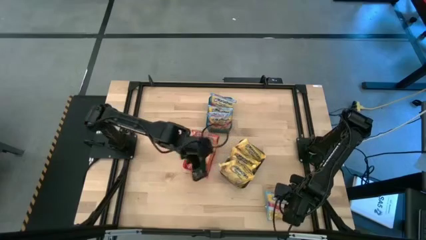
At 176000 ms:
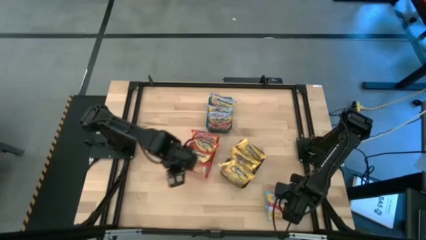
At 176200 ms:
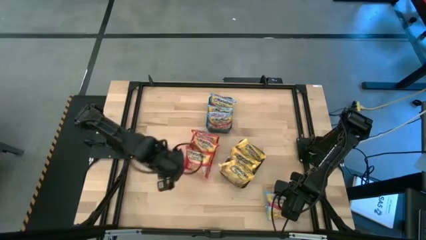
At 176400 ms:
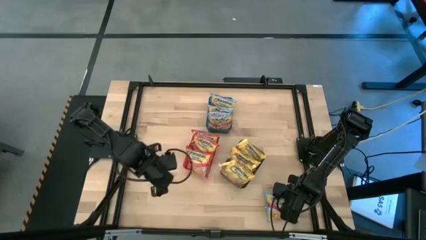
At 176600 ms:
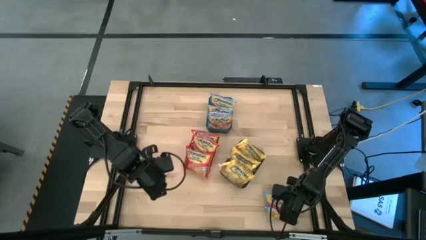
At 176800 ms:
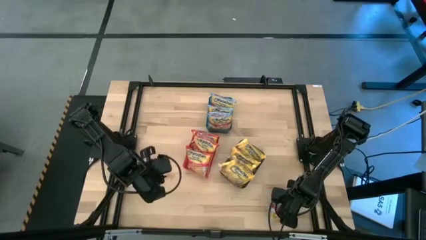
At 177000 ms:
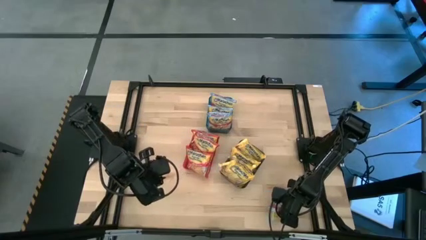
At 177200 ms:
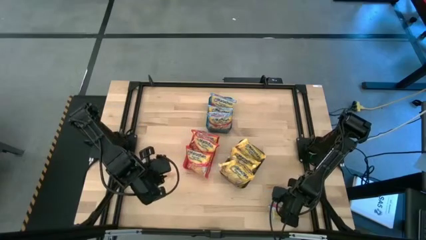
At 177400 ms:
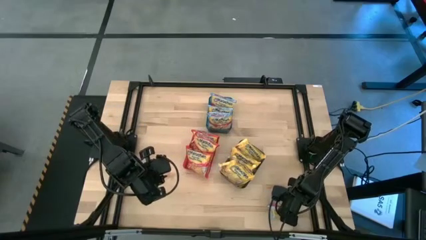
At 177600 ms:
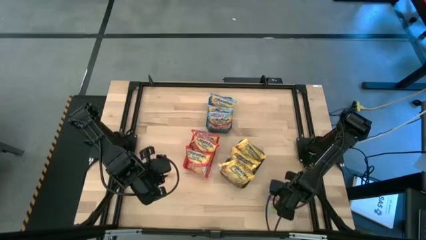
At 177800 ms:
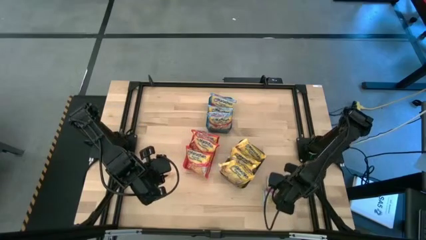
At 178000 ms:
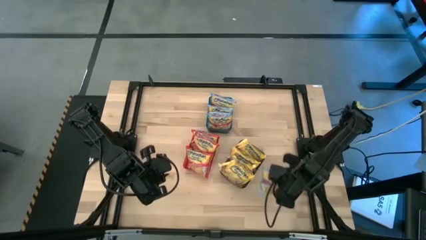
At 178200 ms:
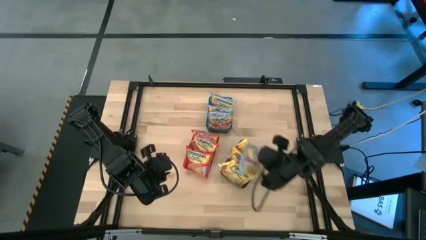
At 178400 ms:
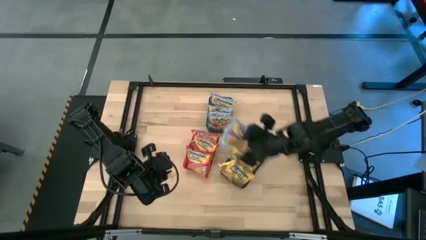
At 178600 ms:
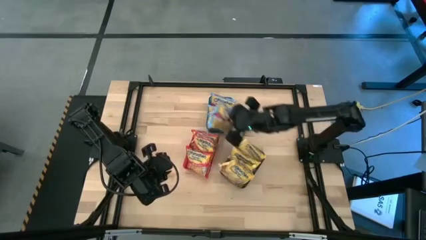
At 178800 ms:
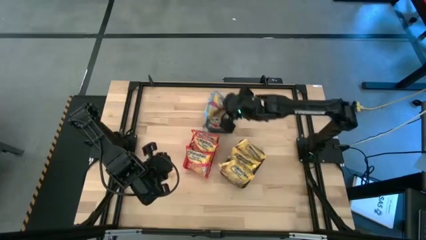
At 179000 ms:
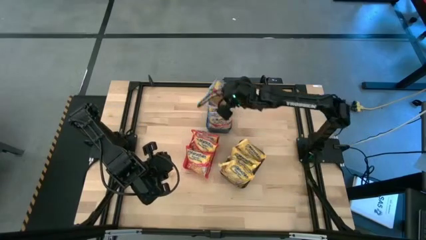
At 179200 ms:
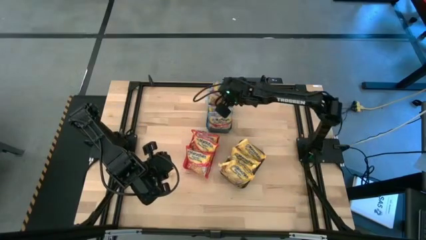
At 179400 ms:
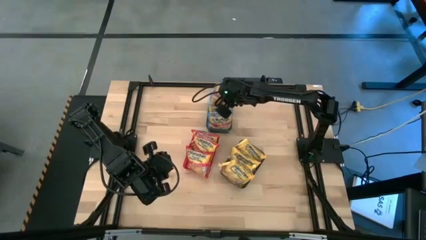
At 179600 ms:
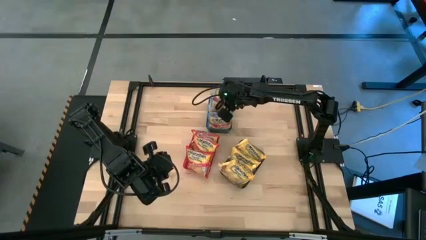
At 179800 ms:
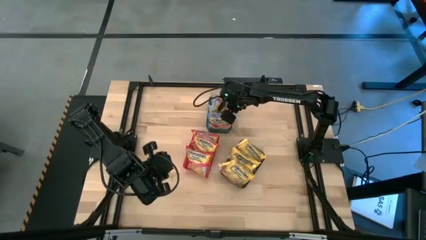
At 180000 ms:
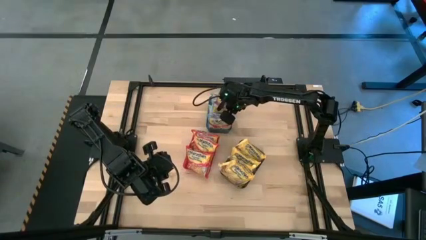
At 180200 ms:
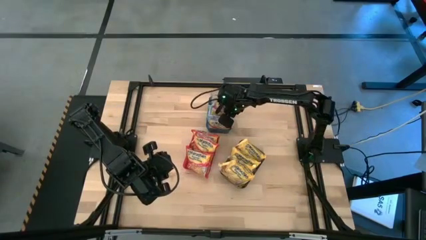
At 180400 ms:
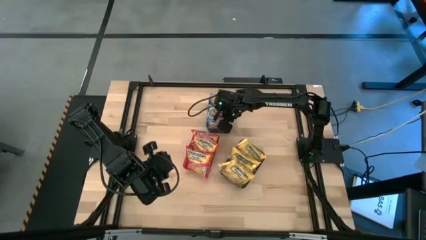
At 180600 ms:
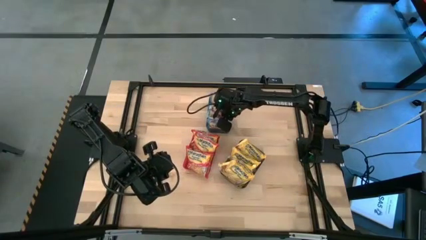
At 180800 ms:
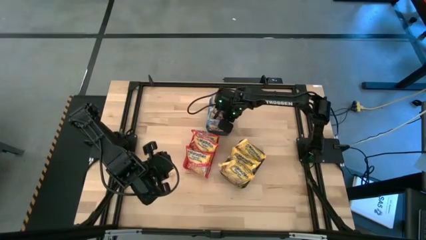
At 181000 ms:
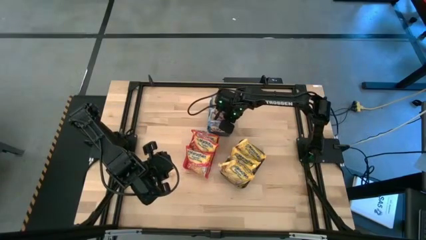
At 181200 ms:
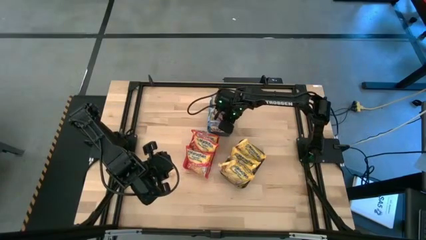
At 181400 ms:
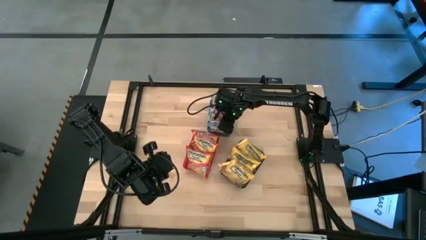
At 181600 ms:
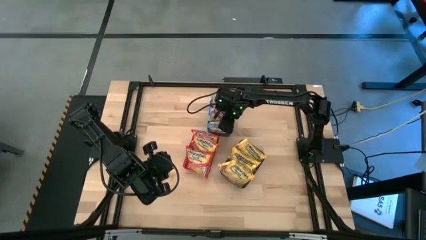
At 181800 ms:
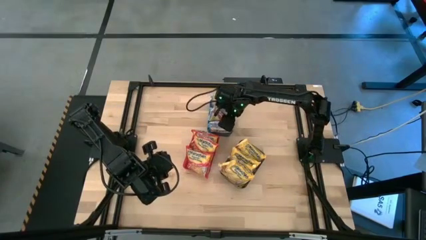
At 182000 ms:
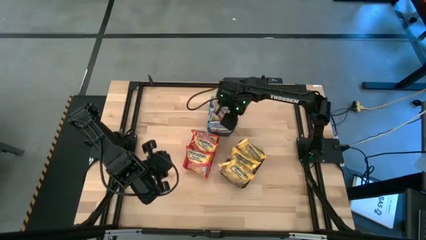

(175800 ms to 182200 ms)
Task: Sort Maruchan noodles
Put the blue bag into the blue bin

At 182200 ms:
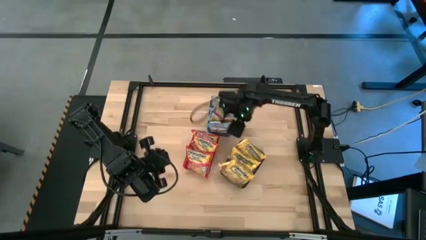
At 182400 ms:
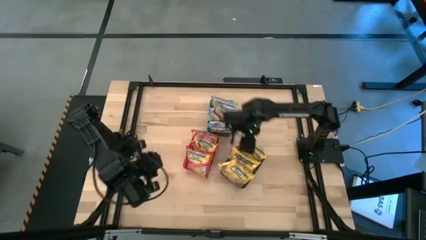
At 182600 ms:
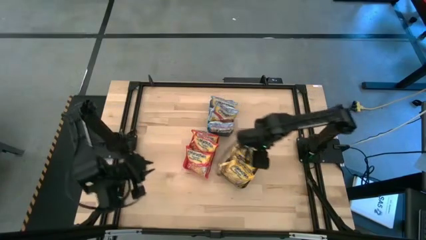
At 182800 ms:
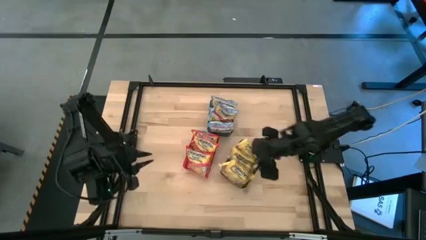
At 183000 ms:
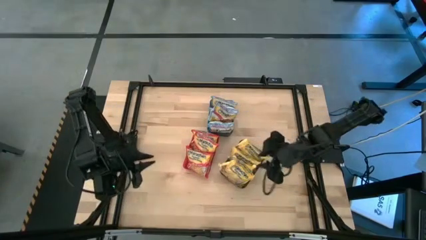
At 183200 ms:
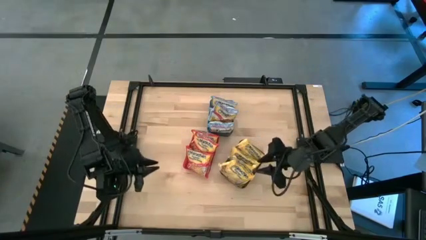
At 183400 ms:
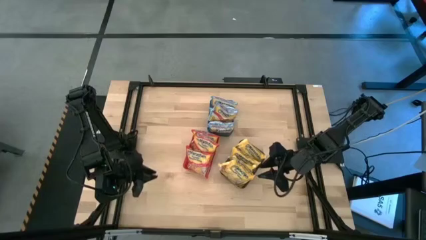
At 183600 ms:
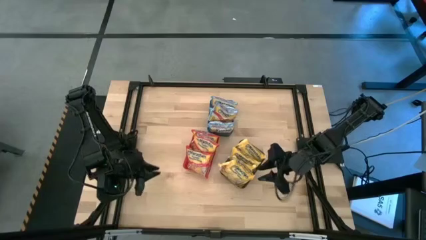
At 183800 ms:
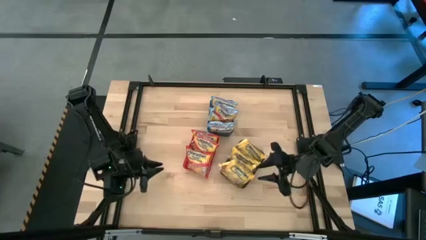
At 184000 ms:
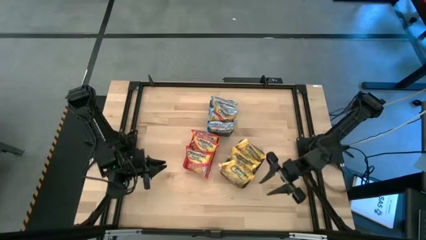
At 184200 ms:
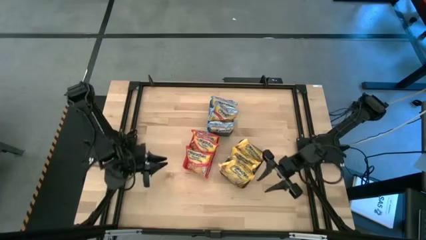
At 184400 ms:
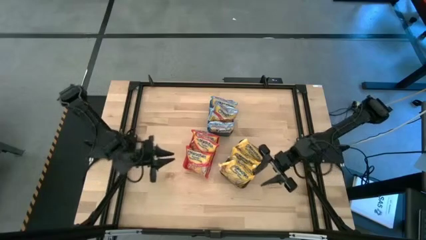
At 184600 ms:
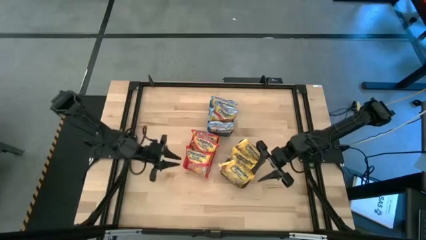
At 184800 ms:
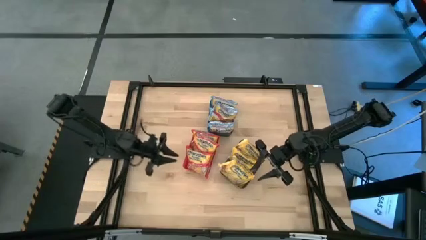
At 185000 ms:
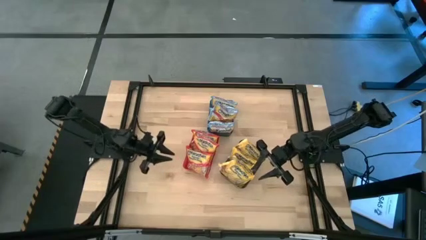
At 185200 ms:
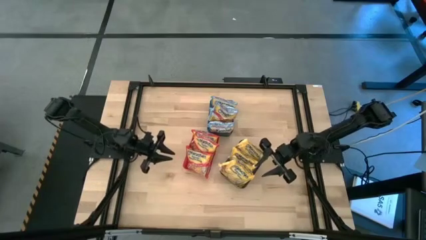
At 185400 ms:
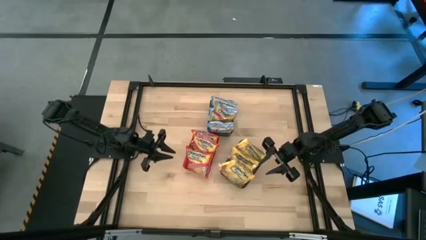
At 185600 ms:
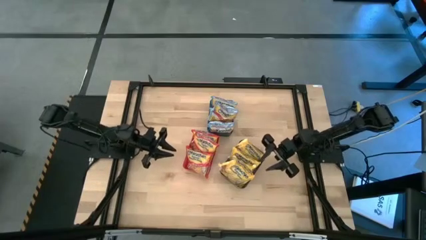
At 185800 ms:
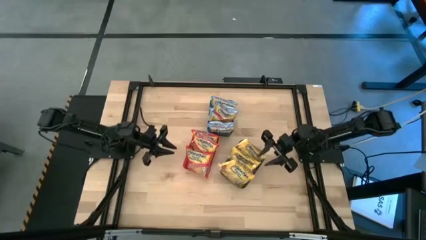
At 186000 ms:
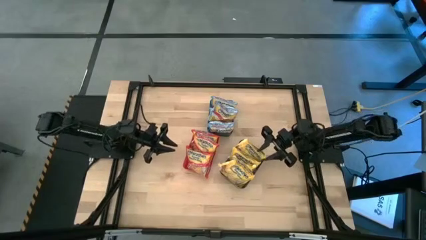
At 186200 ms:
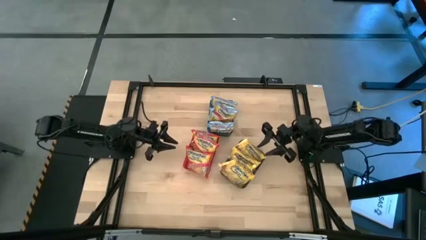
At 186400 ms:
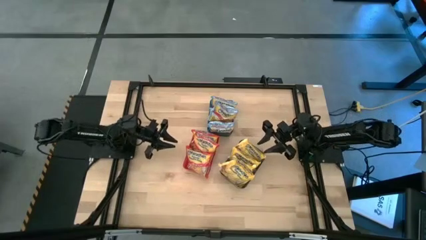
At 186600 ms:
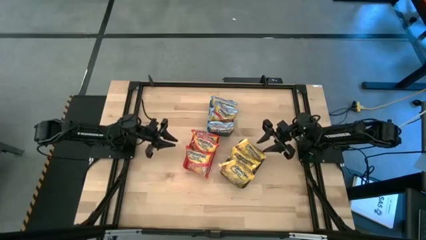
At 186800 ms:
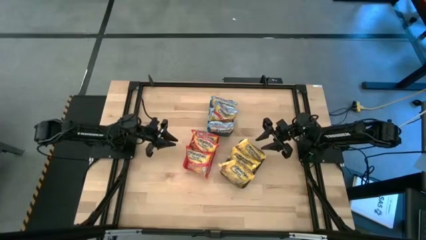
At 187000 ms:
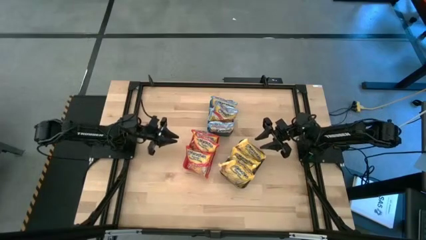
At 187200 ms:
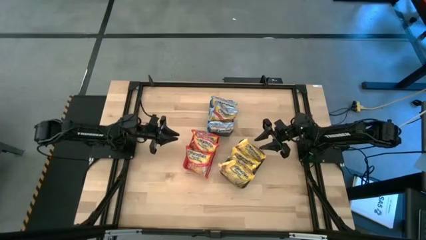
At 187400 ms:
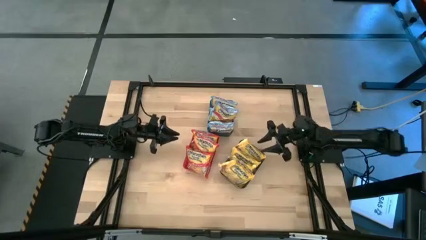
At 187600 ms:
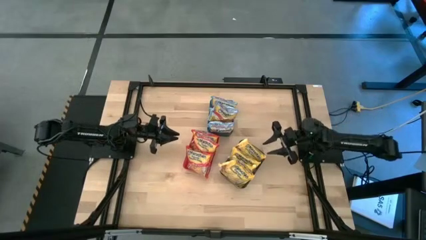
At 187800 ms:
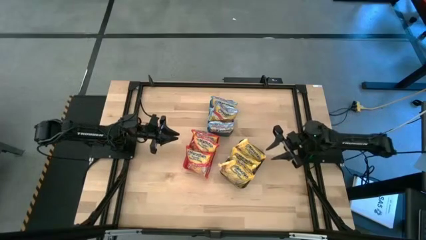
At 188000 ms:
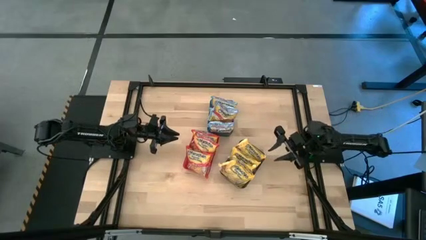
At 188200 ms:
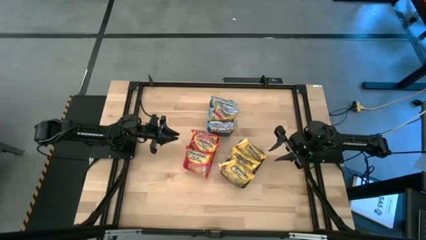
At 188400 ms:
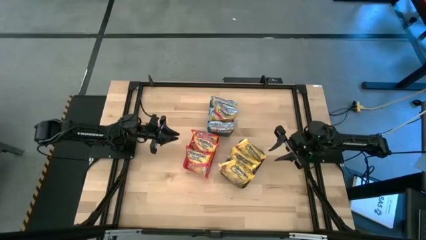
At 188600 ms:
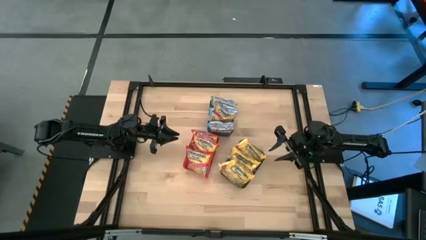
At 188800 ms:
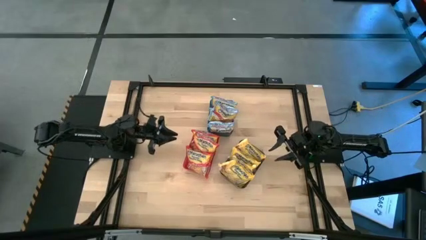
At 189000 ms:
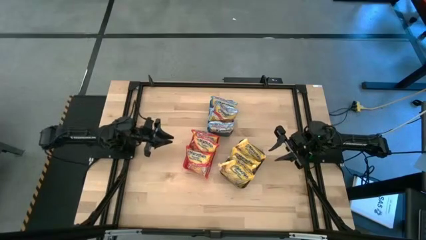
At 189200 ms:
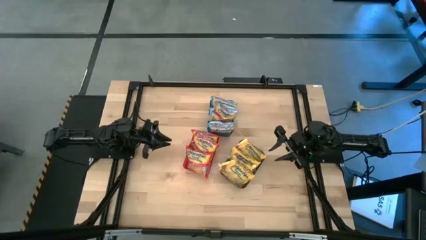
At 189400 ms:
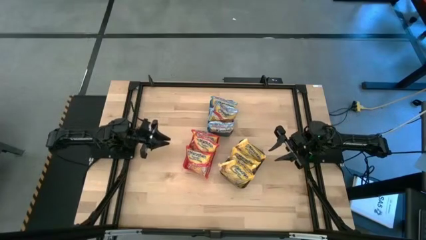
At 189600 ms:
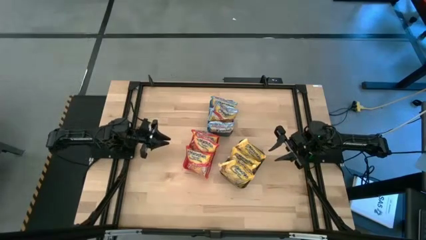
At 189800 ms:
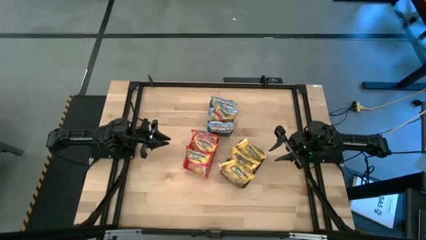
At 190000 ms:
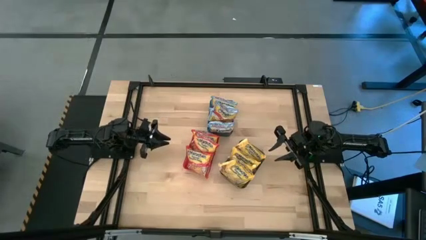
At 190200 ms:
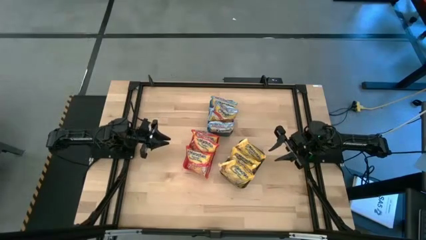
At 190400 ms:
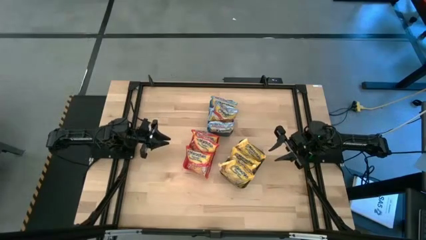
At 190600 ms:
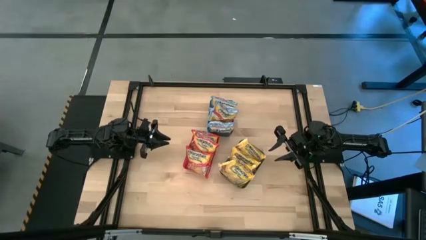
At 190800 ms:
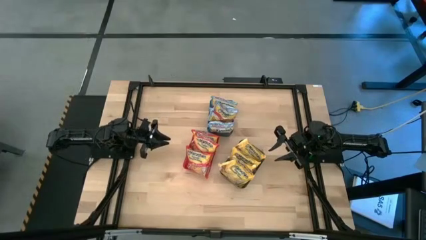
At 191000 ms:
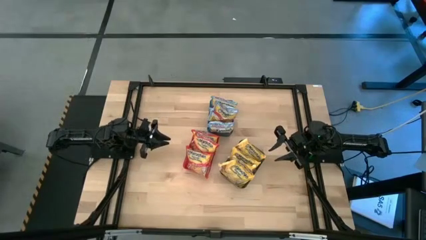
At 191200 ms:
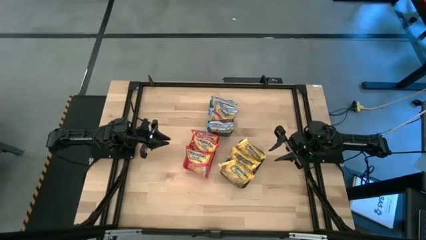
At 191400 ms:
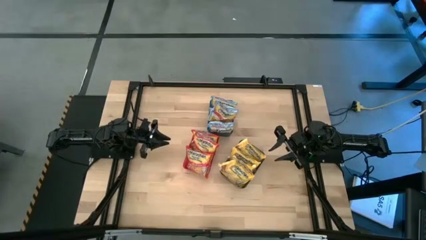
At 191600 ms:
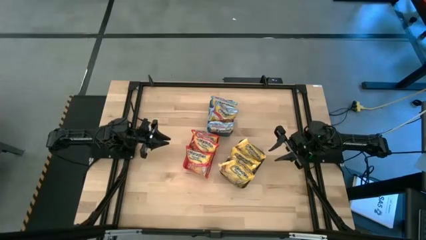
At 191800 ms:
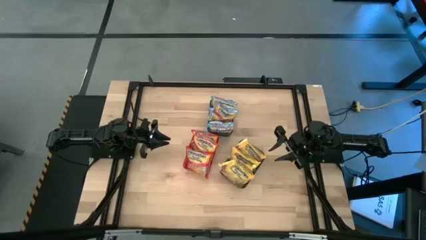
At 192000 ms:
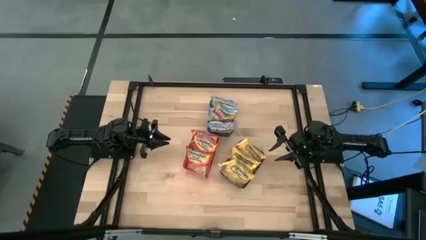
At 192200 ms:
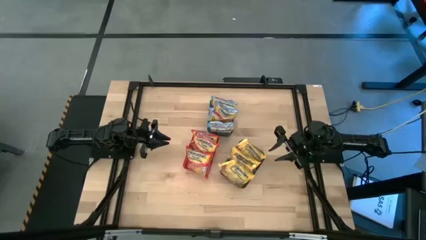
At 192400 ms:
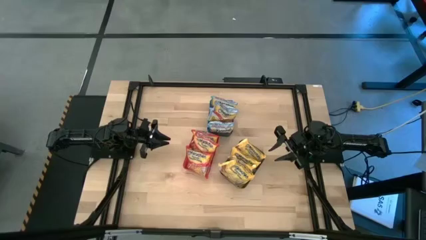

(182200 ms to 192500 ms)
Return to Home Position
